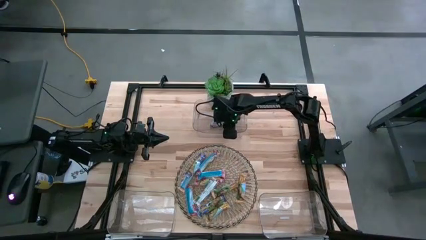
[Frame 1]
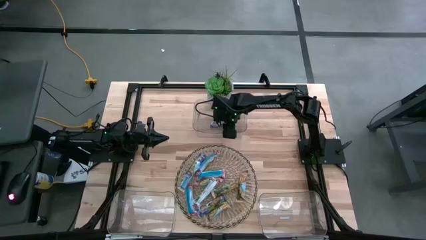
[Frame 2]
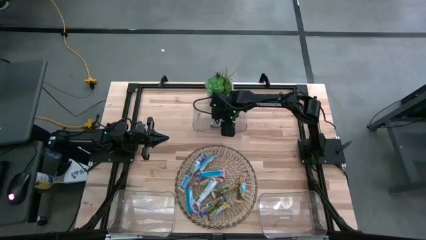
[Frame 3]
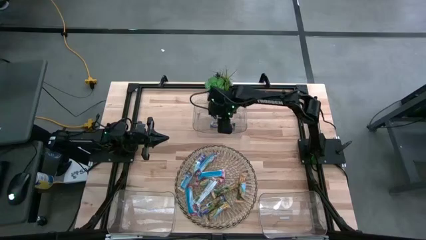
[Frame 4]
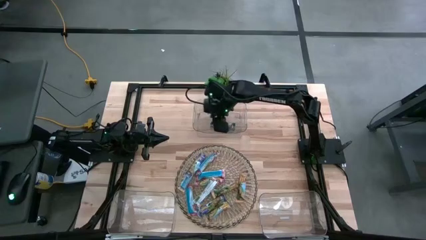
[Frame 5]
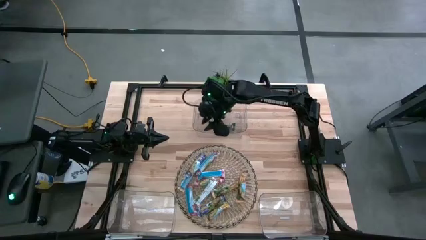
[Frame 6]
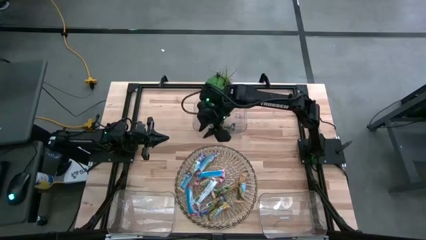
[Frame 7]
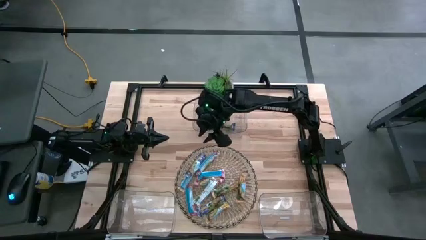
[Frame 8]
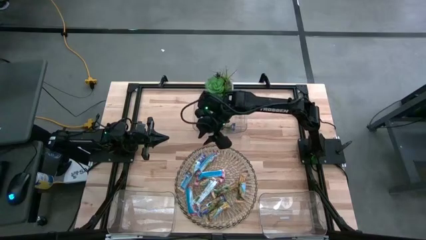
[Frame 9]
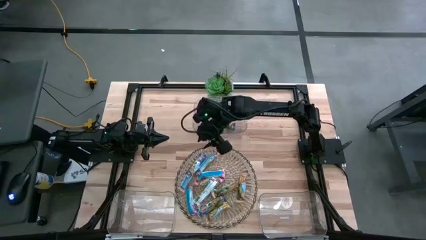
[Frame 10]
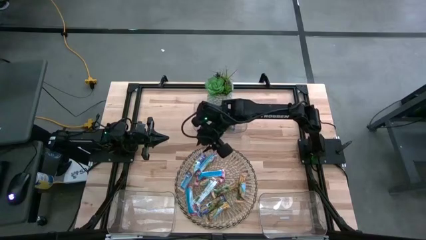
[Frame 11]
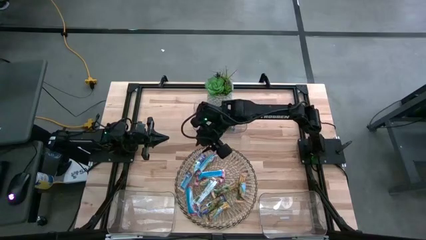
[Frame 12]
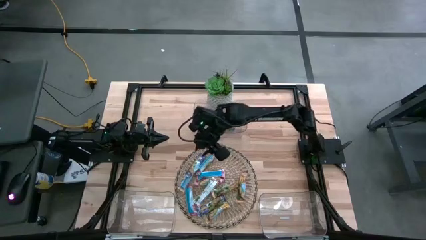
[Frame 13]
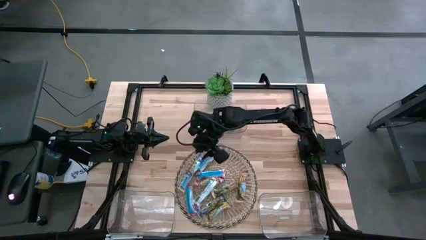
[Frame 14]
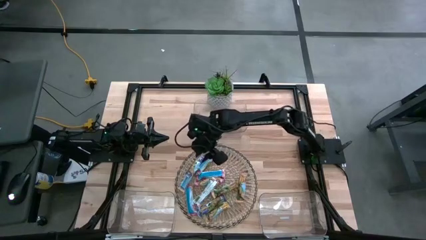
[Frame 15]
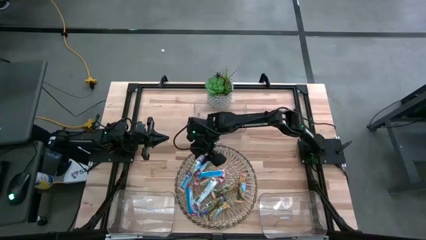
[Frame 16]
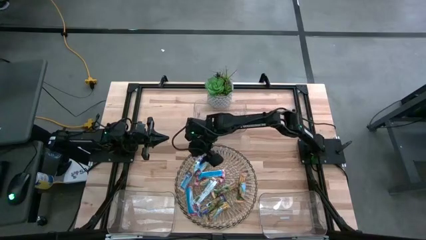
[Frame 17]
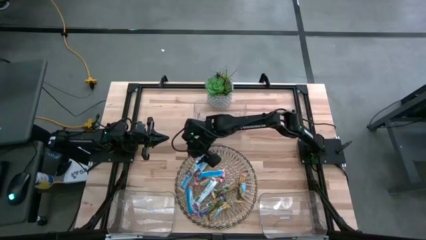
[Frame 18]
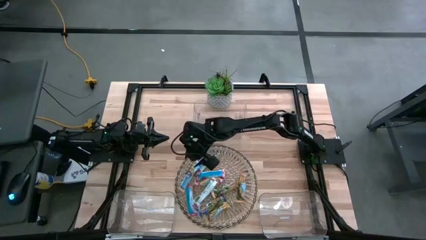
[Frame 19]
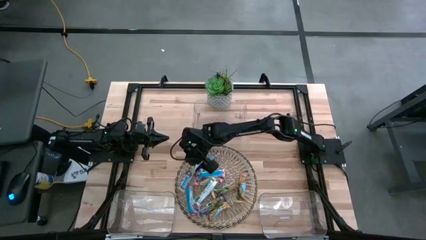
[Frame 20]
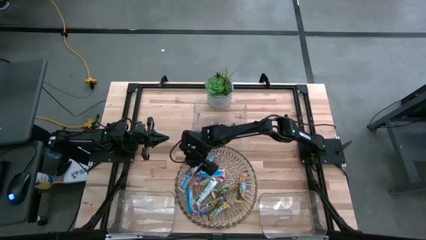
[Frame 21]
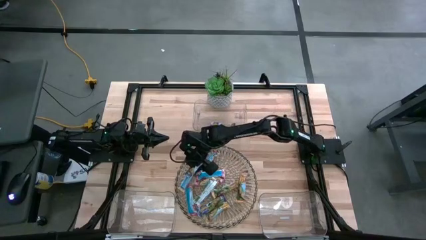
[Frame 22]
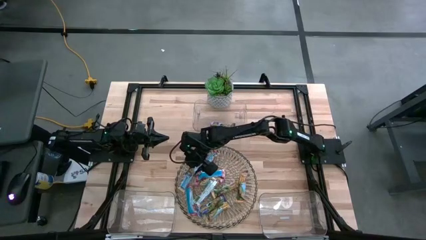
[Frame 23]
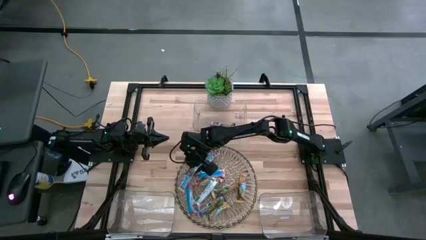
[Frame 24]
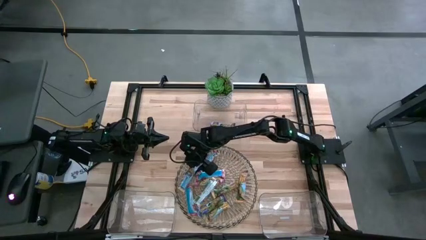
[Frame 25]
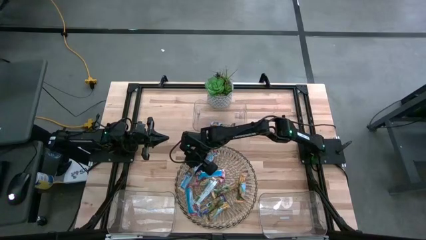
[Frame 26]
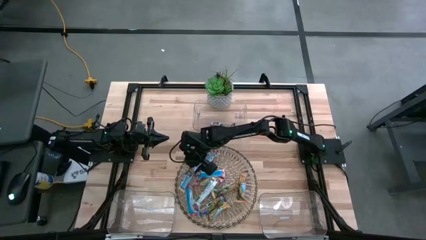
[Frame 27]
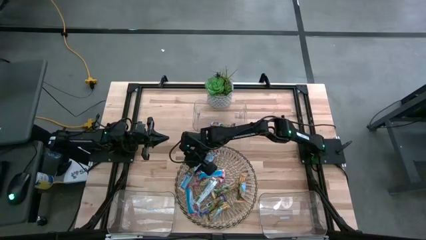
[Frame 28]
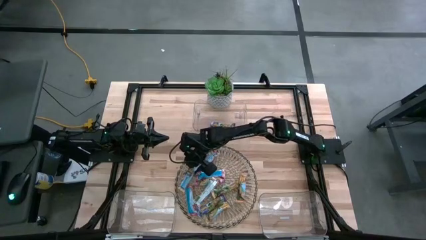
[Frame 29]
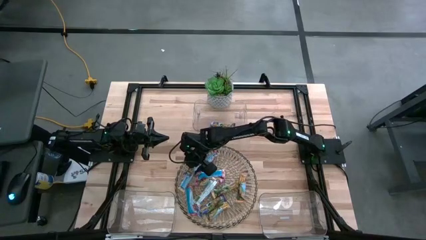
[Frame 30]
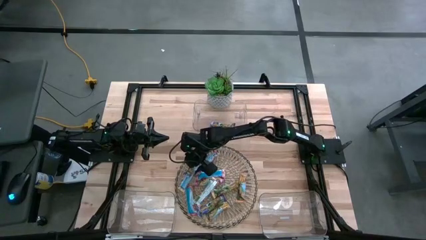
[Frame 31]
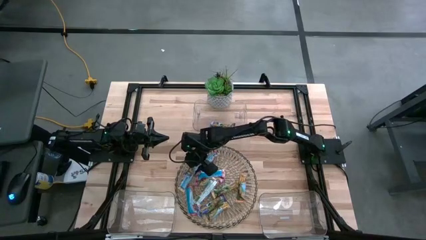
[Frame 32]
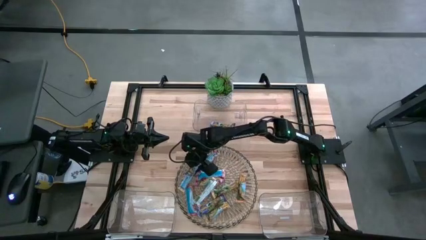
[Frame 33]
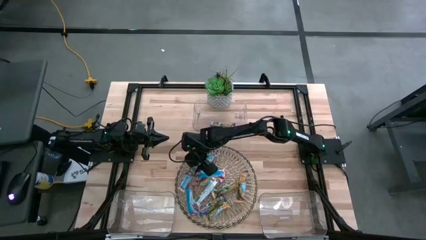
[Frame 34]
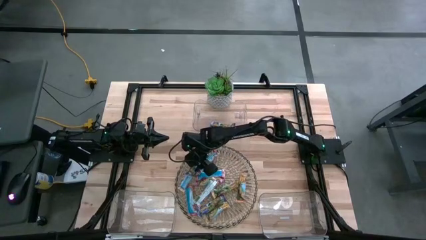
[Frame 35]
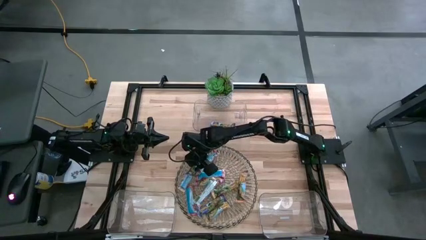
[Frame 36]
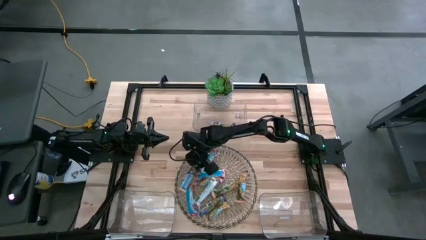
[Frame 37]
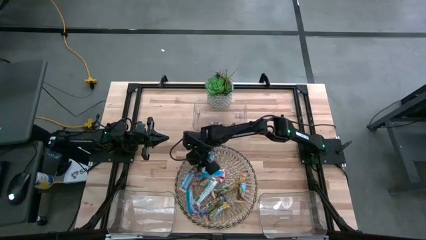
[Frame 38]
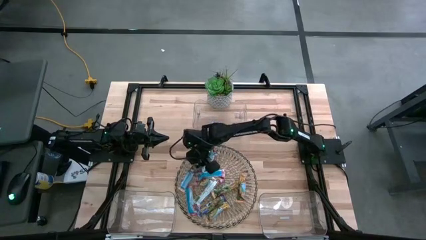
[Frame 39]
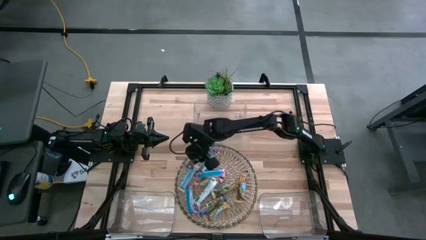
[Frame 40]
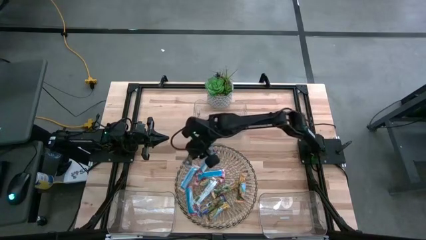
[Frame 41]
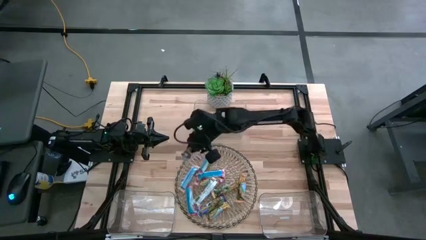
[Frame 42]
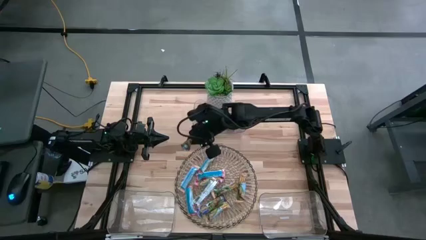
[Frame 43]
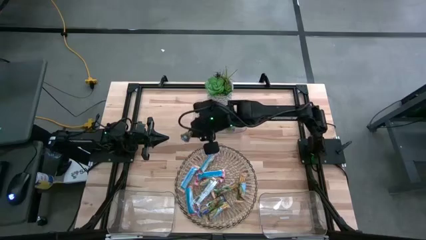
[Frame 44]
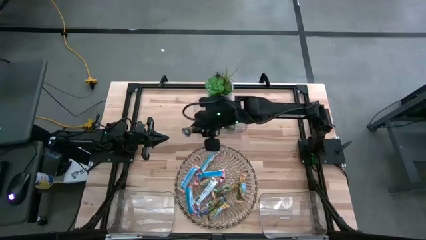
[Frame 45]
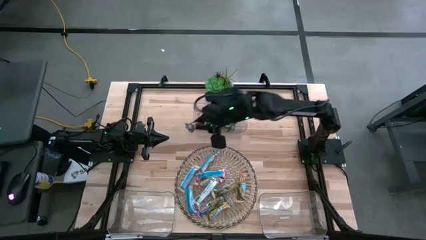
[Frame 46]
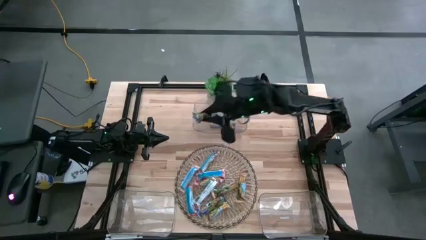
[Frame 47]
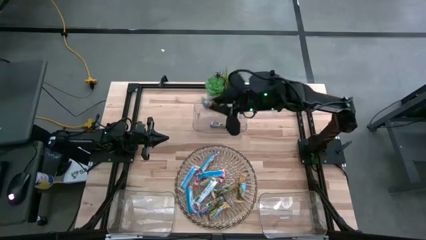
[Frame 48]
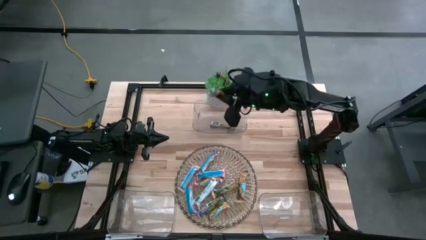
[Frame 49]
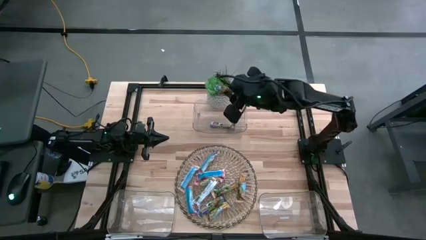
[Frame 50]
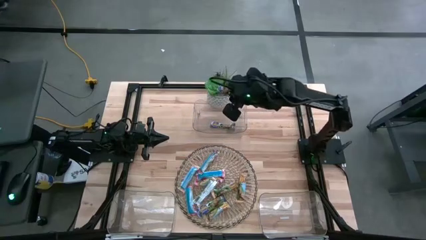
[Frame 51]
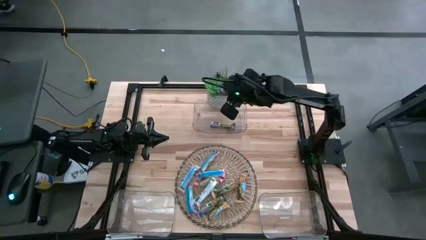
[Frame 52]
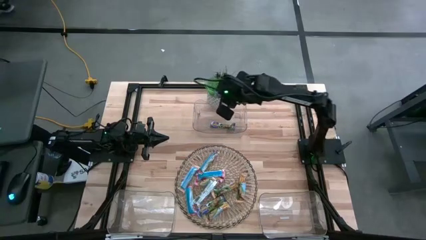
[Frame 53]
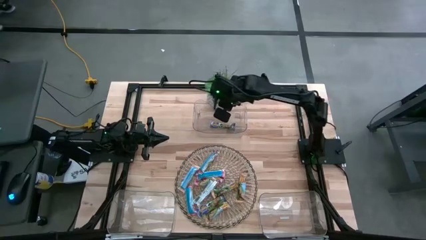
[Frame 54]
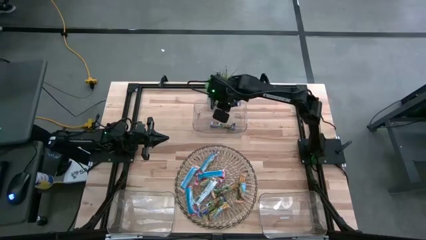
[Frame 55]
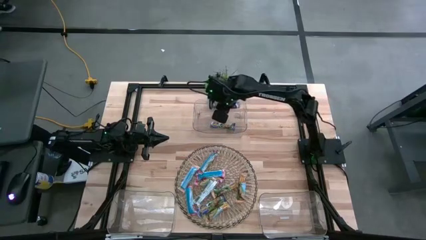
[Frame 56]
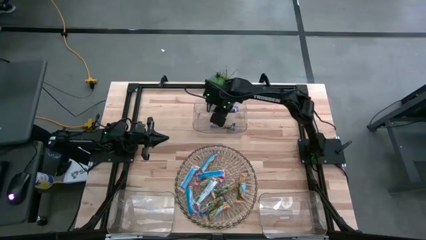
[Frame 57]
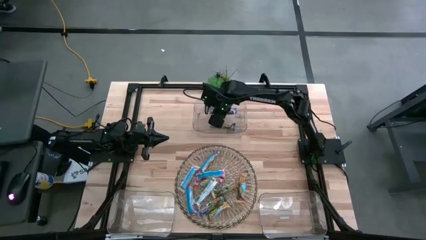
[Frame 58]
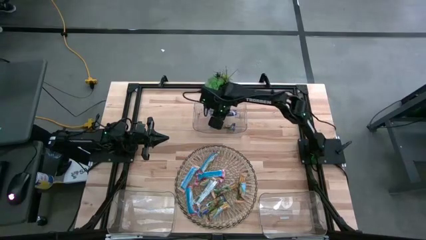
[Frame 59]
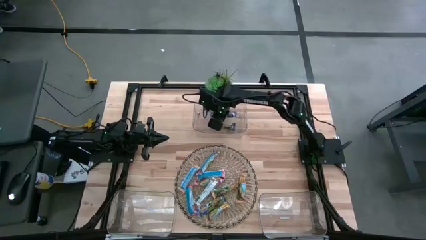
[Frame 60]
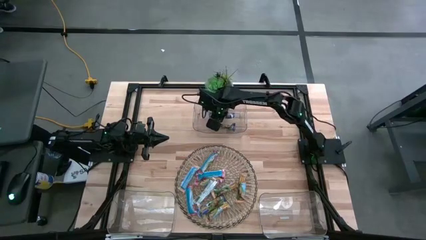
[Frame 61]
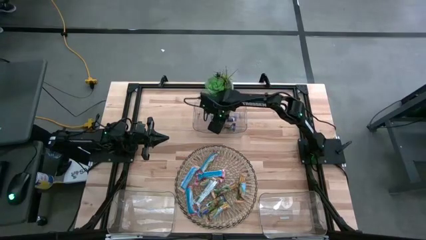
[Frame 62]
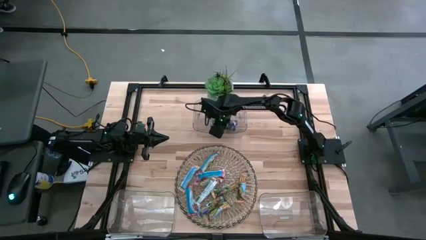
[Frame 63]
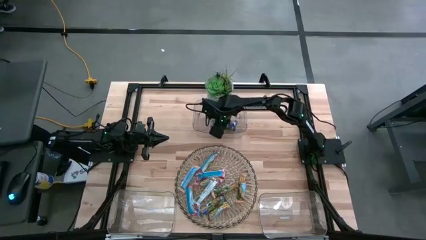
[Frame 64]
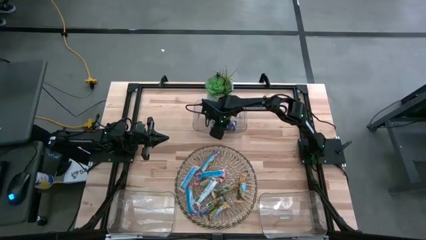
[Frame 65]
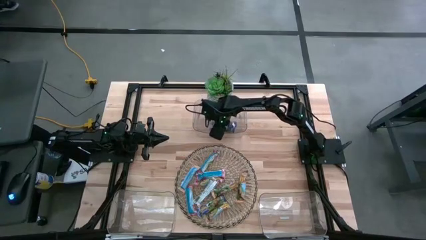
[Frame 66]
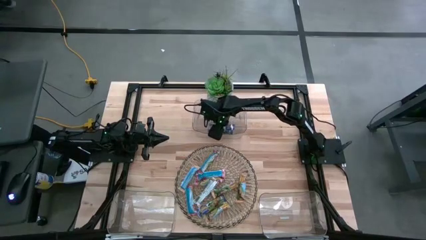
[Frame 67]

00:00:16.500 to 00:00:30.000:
Task: Pick and place Granola Bars by type
Put the blue granola bar into the top transparent bin

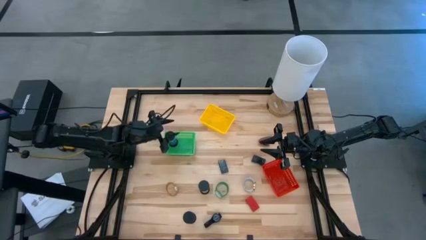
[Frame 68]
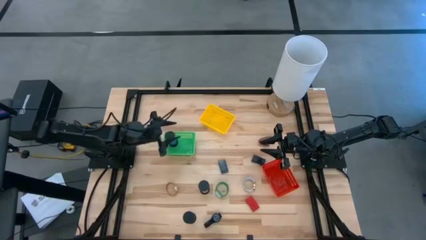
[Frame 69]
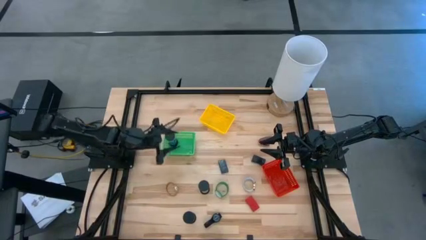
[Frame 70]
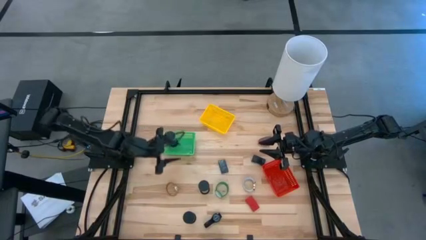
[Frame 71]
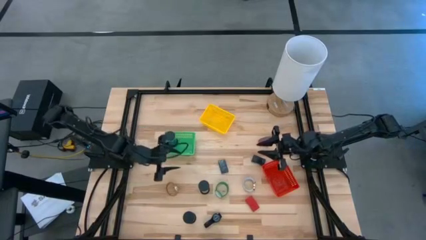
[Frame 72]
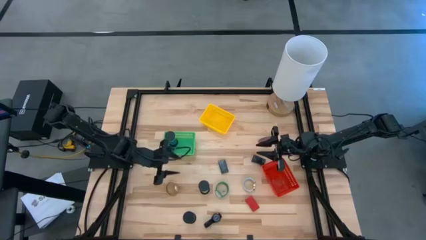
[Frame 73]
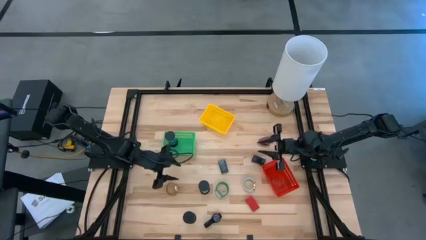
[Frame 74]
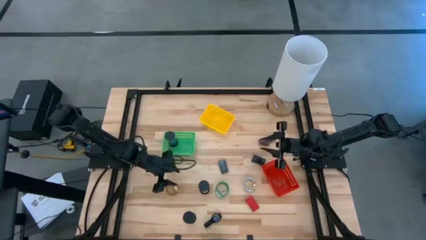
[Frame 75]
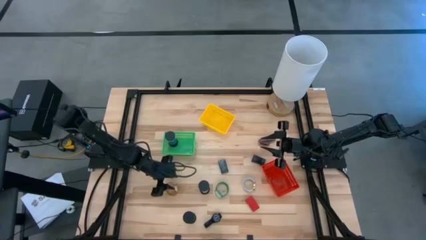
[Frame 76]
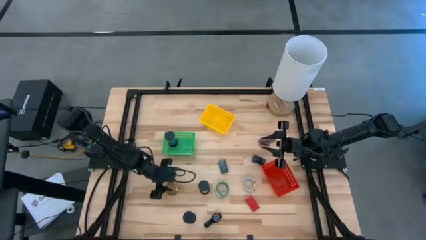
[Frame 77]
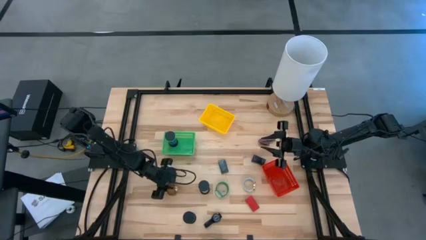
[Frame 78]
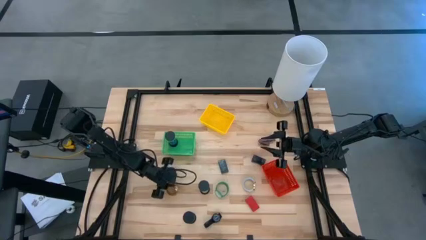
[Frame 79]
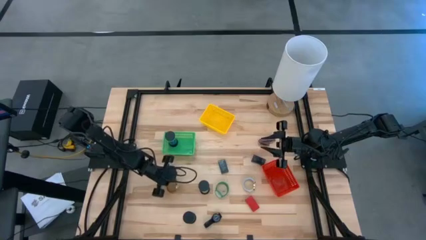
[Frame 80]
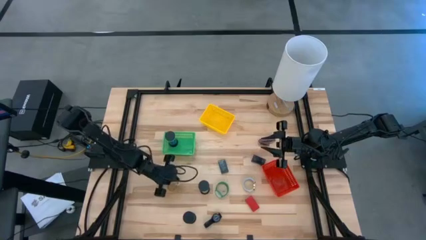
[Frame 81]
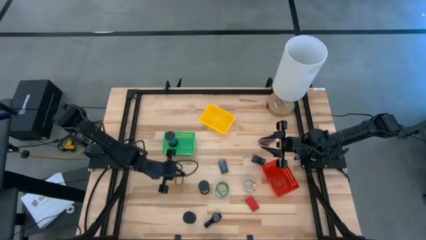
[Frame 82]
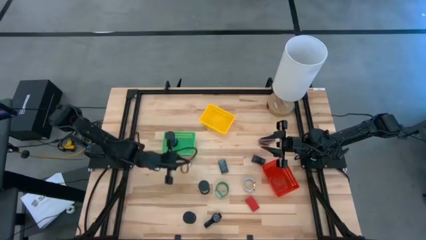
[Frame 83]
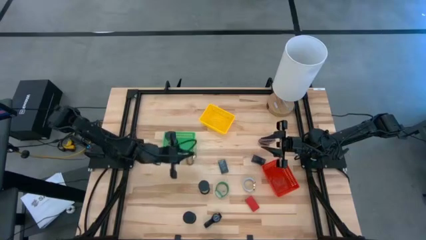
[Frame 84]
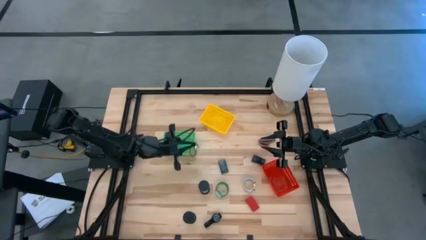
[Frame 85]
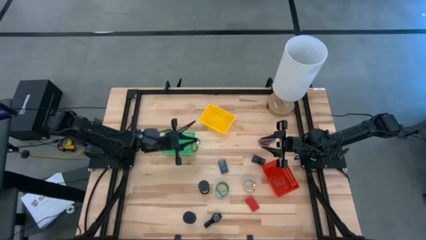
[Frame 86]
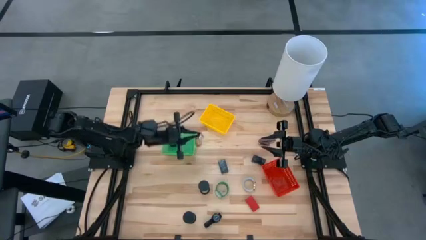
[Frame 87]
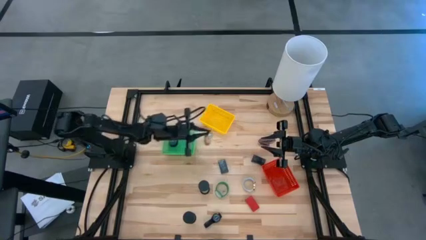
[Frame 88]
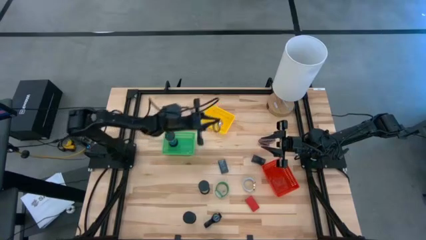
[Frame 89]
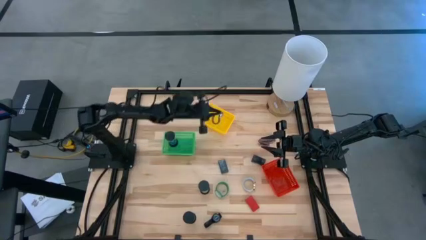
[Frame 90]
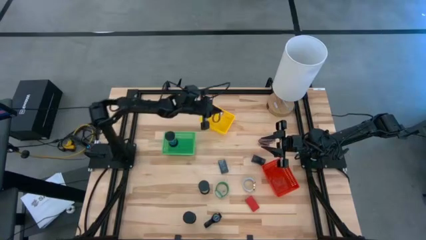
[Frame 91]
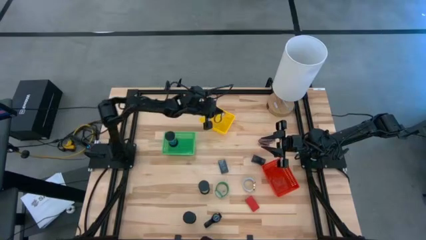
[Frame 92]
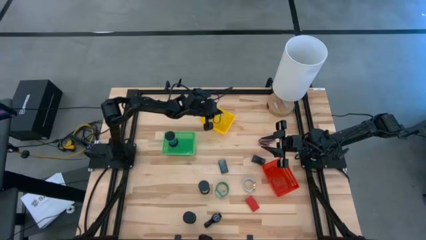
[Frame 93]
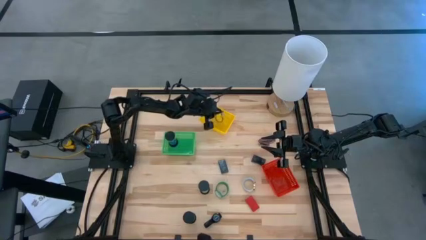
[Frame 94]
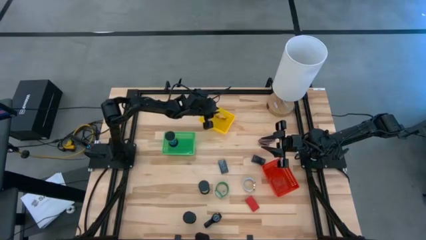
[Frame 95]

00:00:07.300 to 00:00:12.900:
Task: Pick & Place Office items
Put the gold watch into the yellow basket
